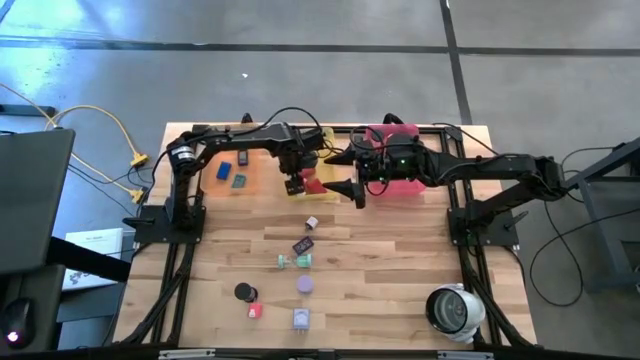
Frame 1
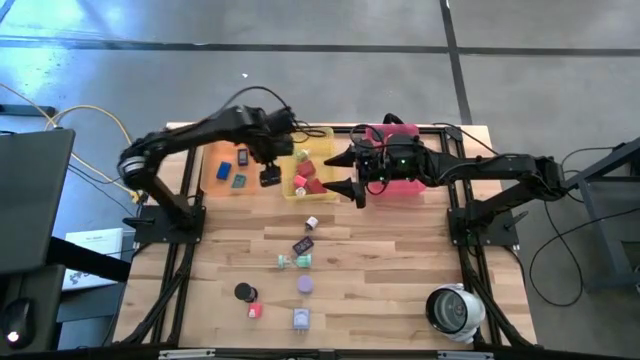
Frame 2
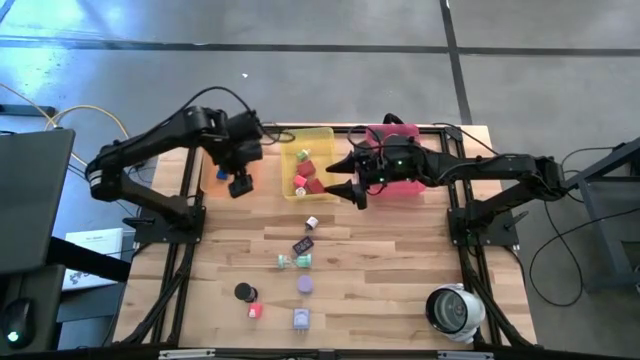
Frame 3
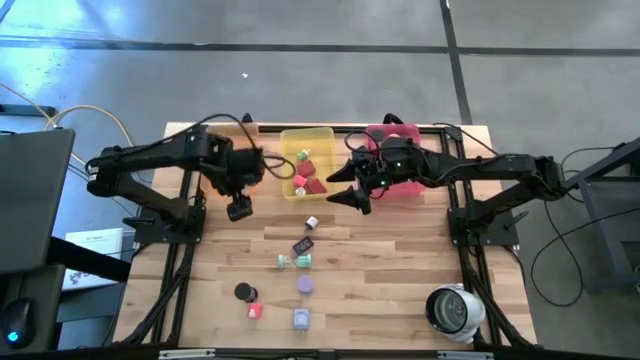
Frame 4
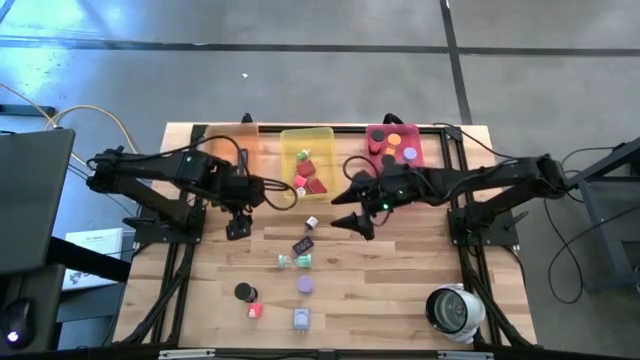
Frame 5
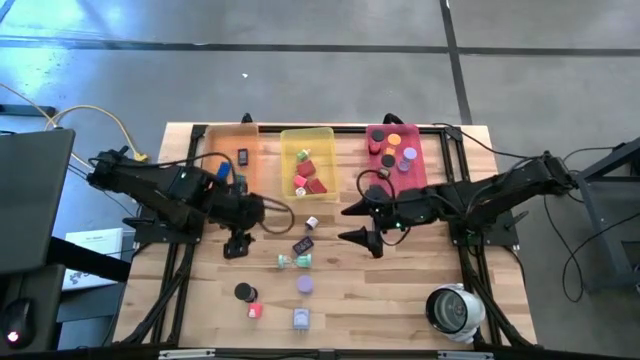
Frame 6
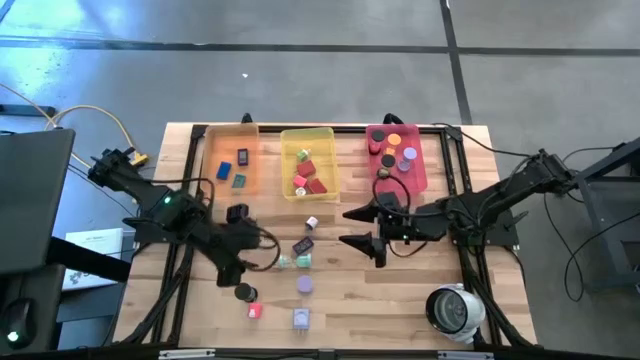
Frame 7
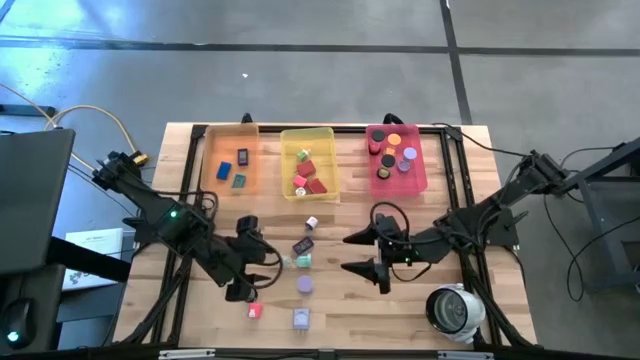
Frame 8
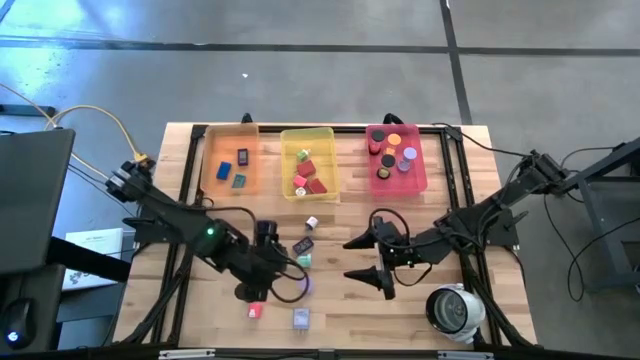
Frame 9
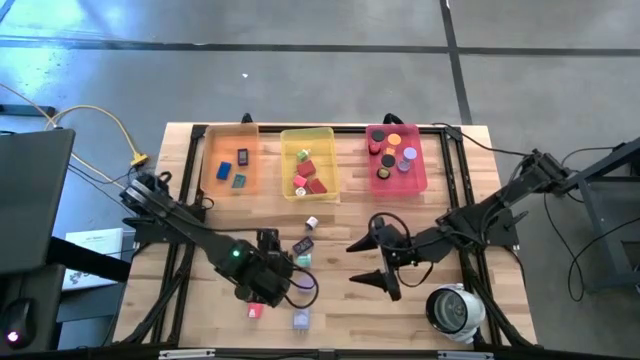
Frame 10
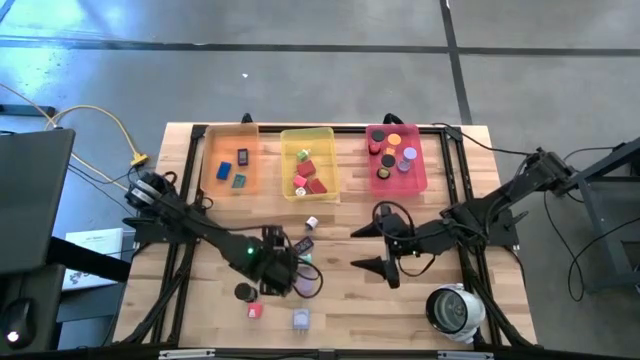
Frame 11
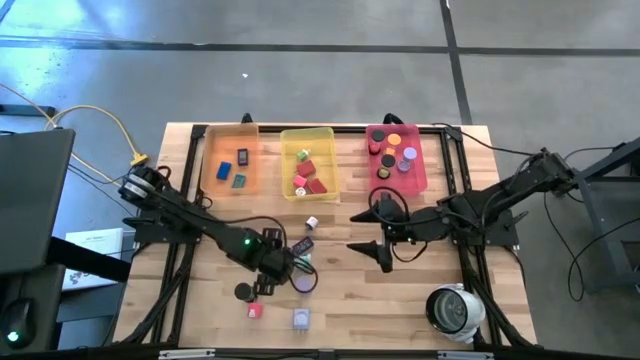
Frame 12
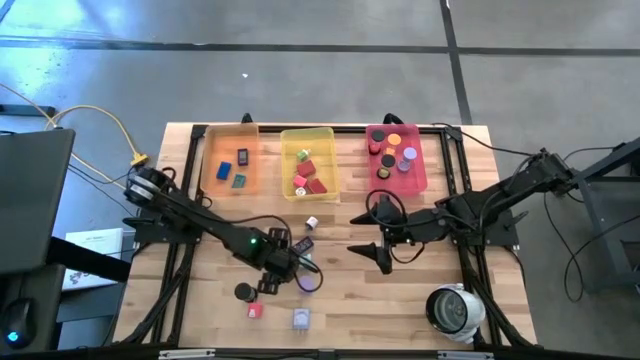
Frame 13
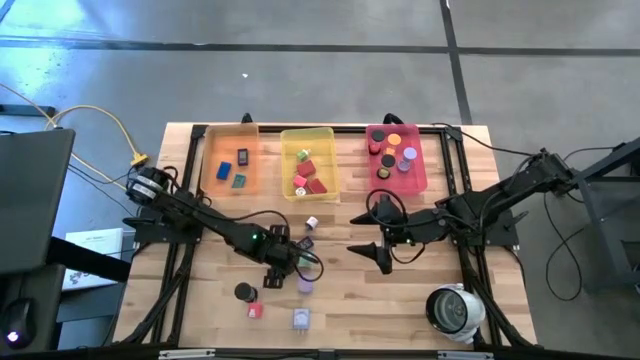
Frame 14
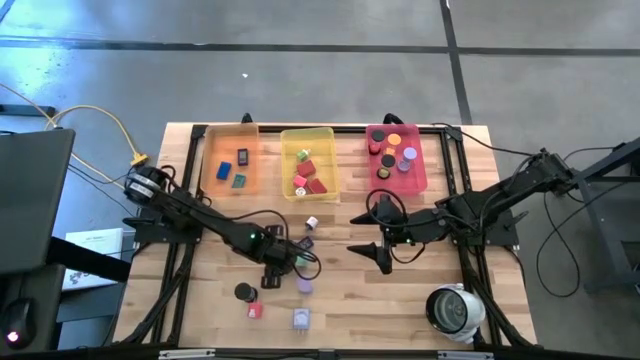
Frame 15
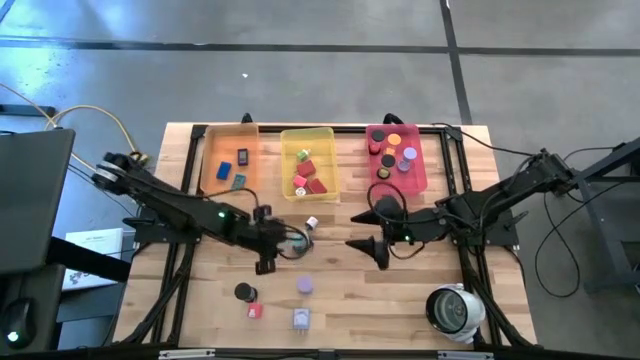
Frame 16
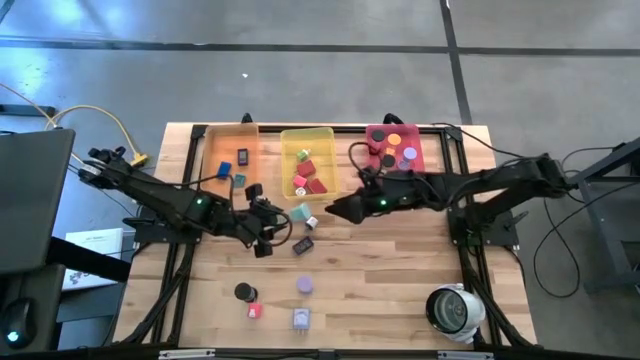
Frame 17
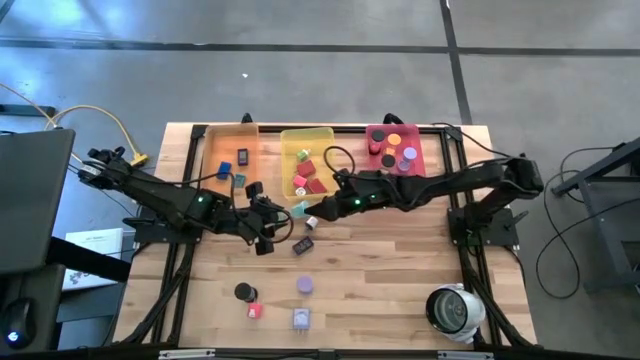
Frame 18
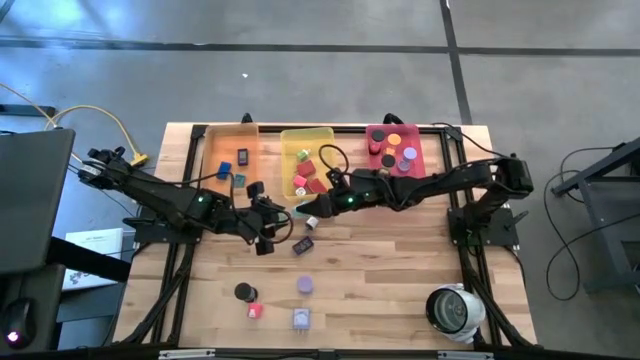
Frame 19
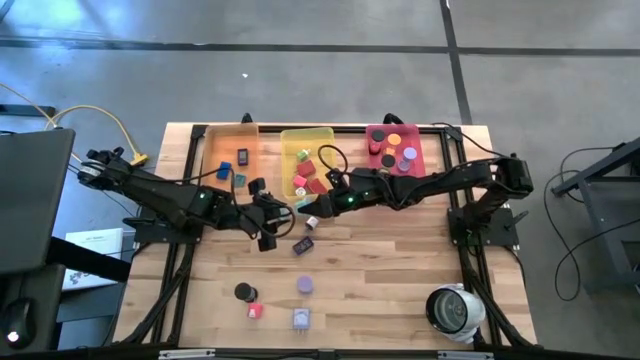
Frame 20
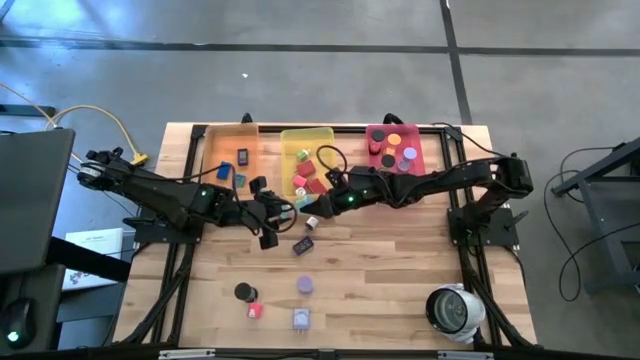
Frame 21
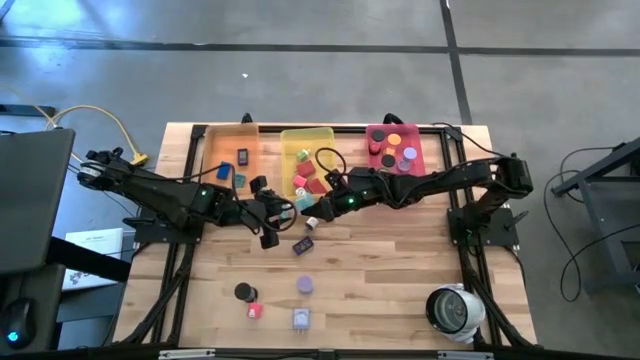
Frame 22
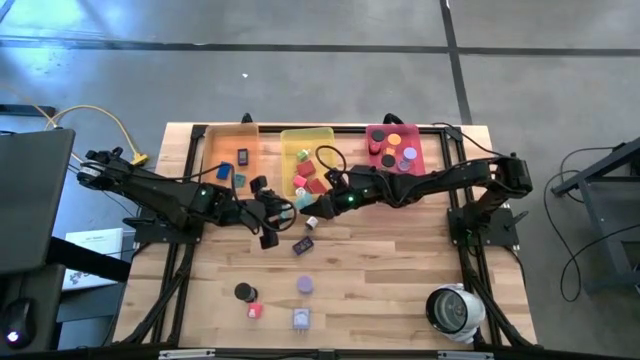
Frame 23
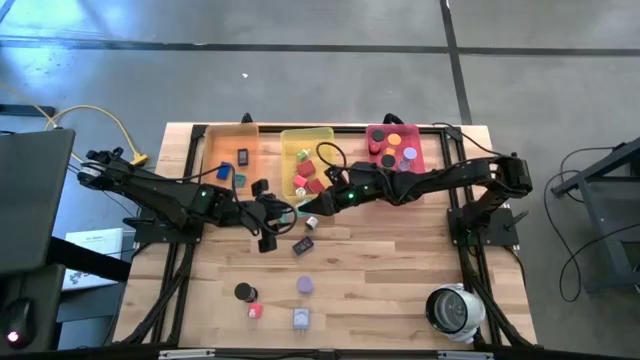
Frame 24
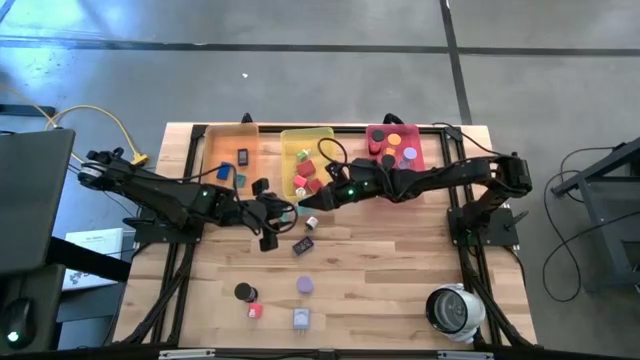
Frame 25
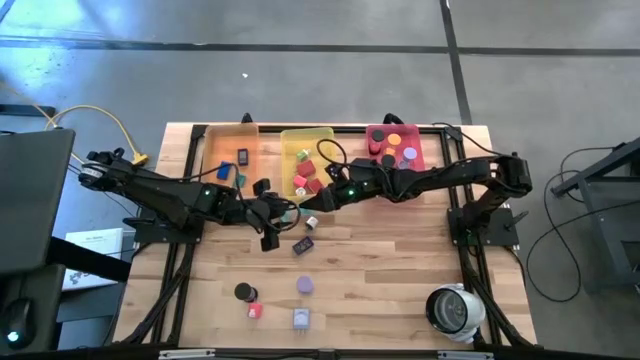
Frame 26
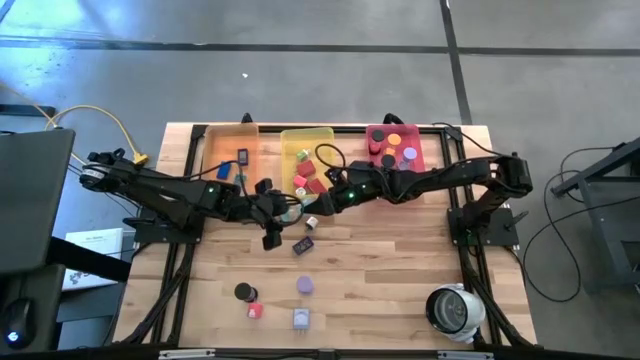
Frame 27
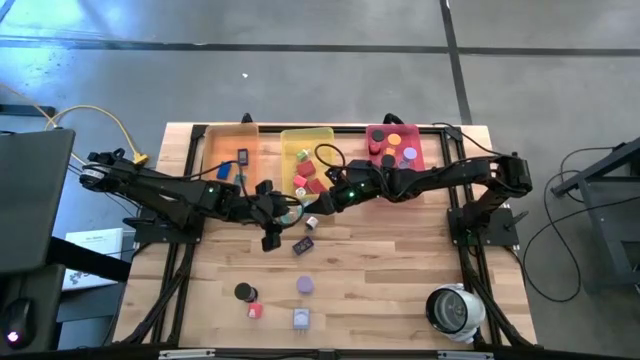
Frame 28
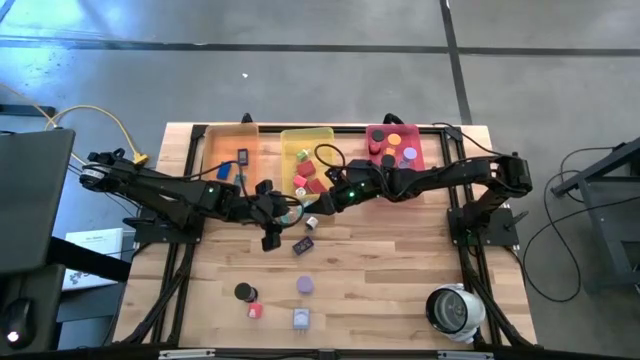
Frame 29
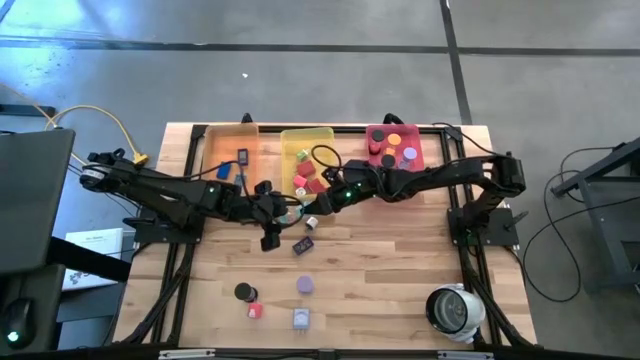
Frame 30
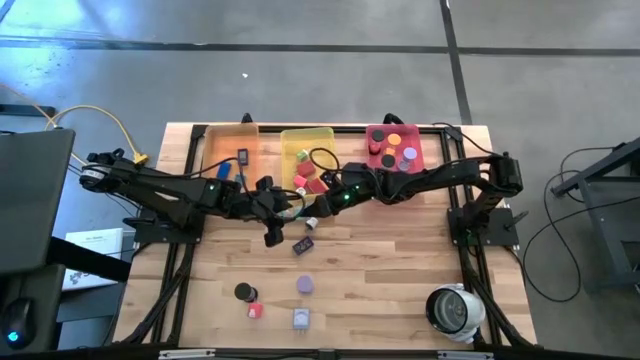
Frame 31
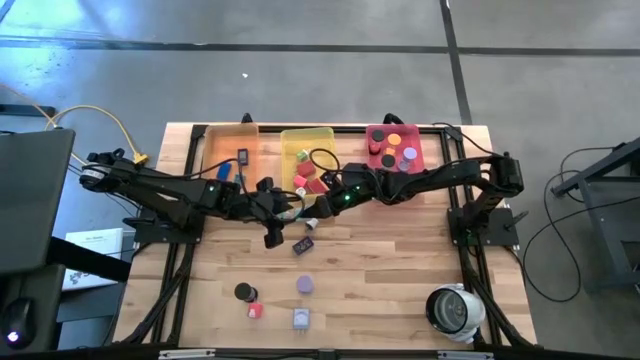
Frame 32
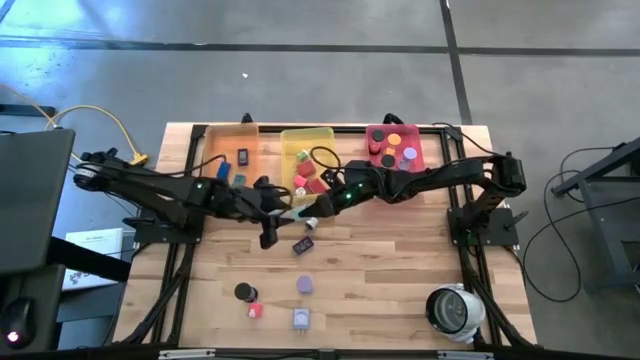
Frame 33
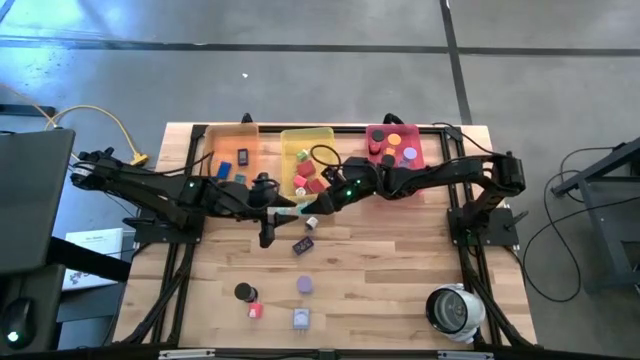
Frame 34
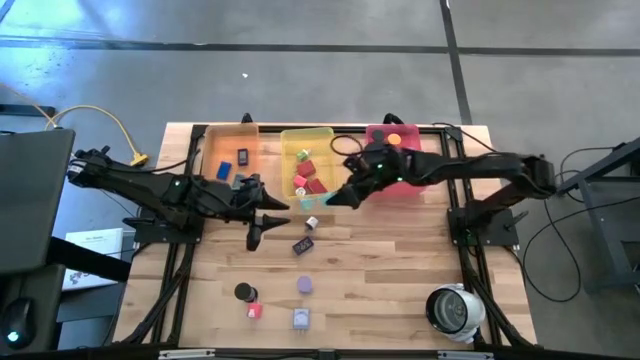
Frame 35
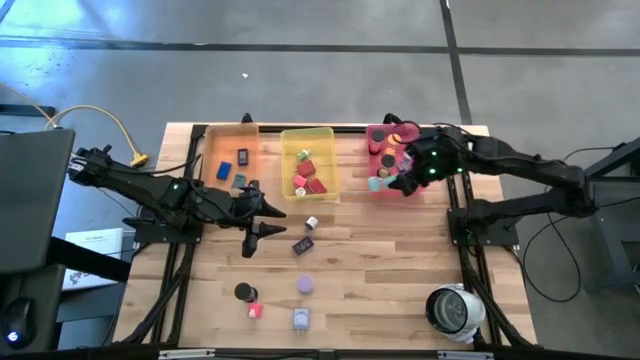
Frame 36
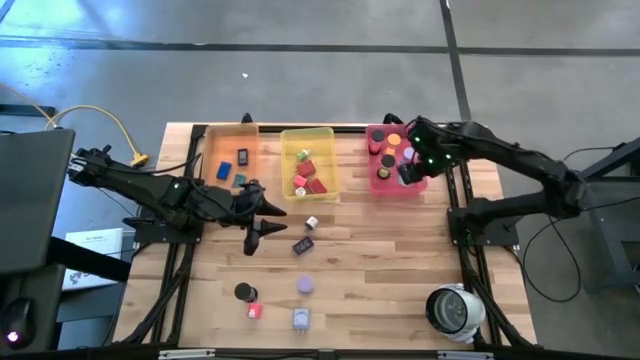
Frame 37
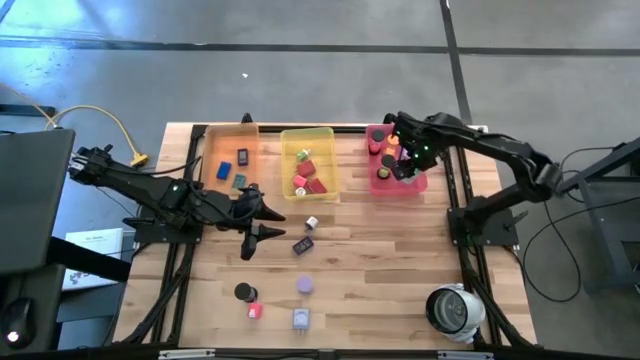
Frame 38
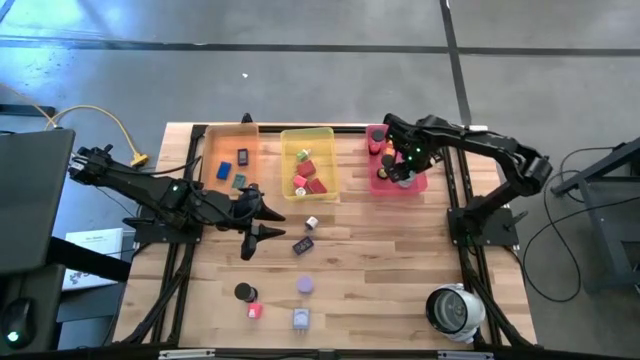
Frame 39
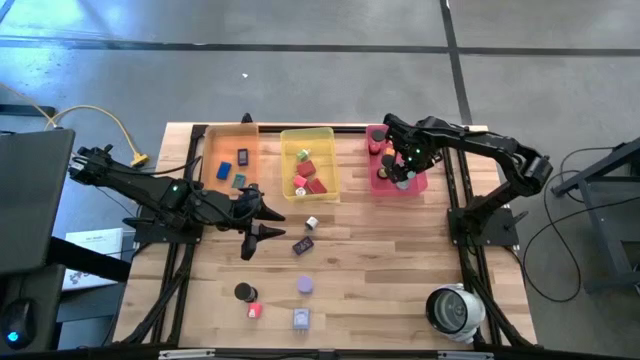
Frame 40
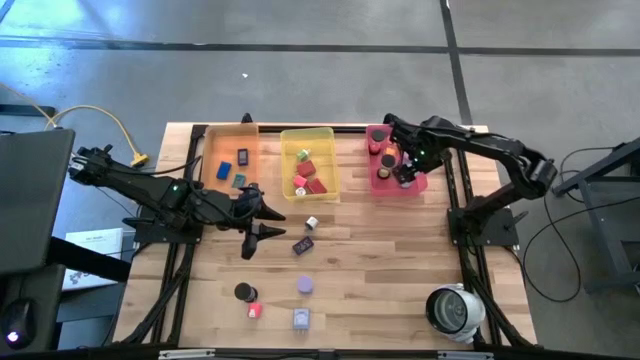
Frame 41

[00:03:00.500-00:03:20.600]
Task: Pick & Place Office items
Put the light blue sand timer into the pink bin
